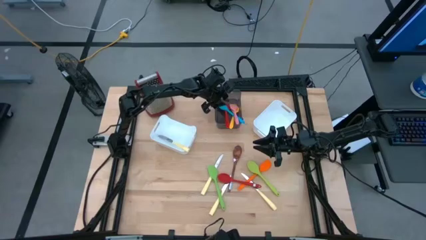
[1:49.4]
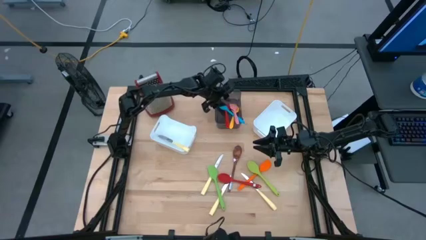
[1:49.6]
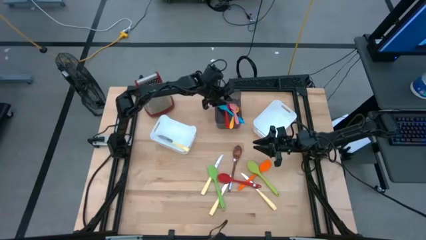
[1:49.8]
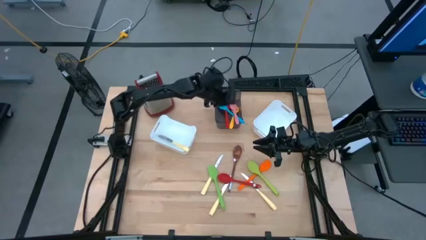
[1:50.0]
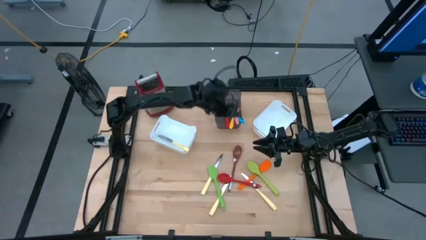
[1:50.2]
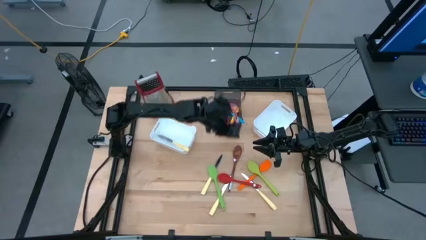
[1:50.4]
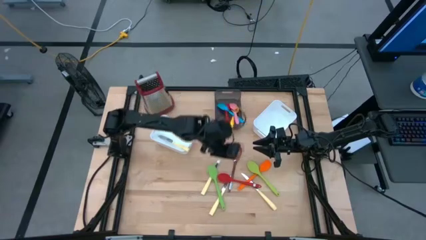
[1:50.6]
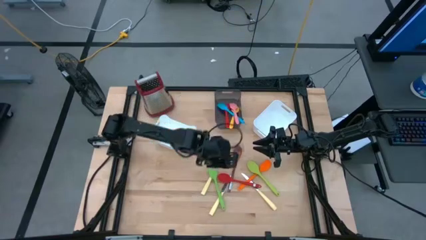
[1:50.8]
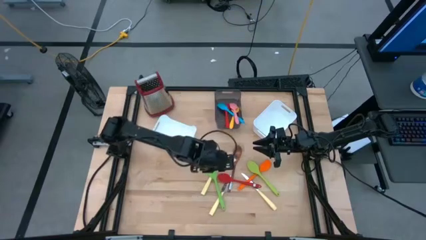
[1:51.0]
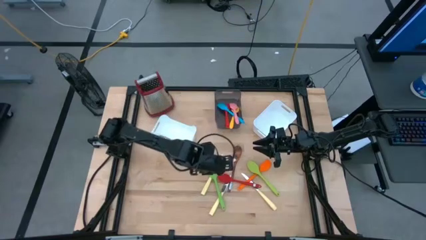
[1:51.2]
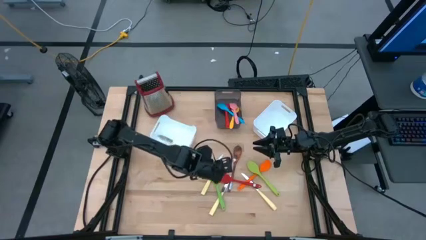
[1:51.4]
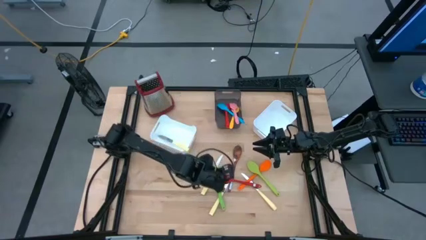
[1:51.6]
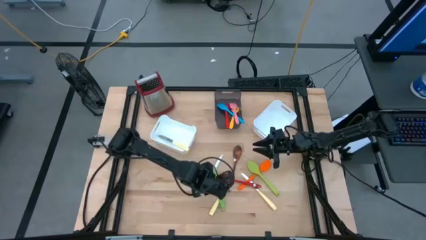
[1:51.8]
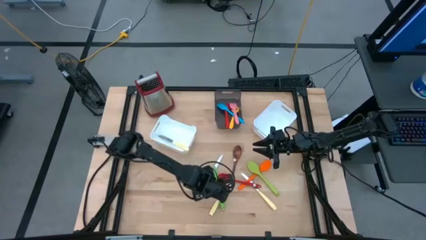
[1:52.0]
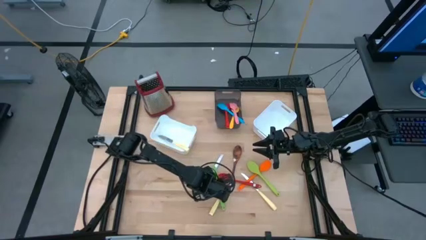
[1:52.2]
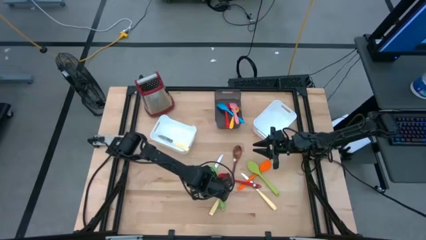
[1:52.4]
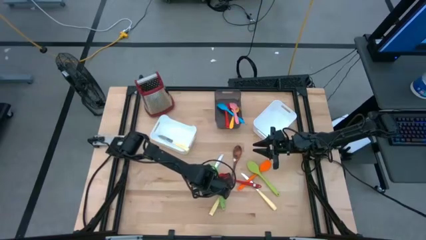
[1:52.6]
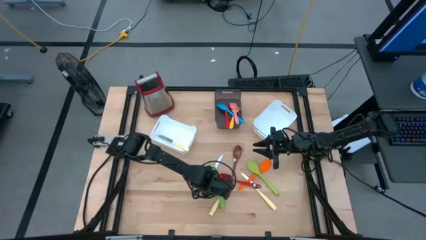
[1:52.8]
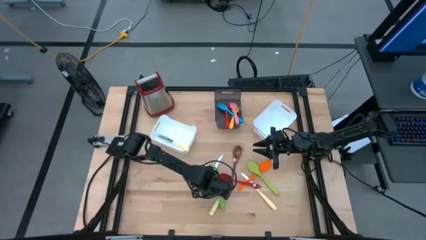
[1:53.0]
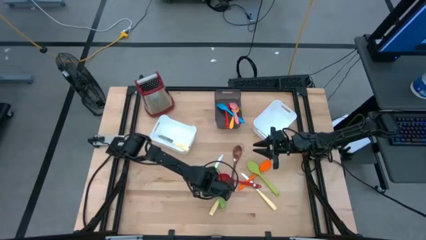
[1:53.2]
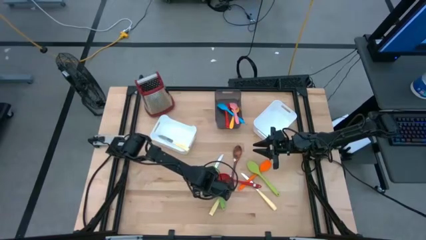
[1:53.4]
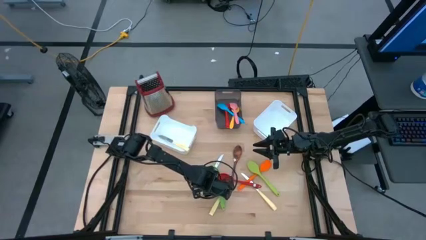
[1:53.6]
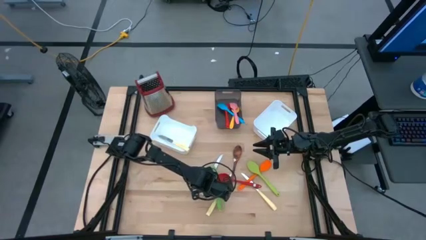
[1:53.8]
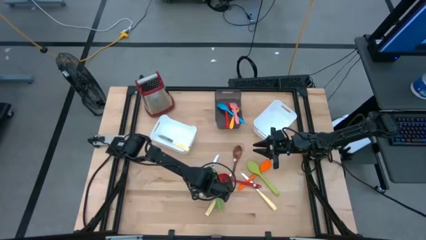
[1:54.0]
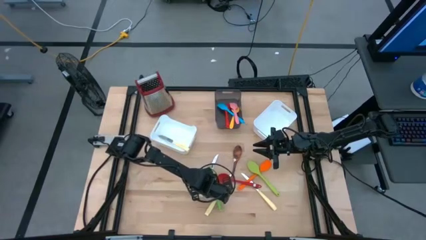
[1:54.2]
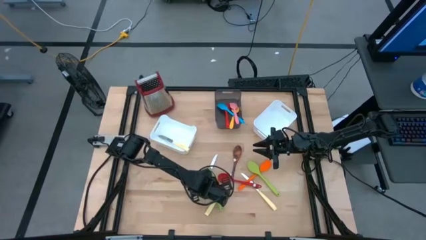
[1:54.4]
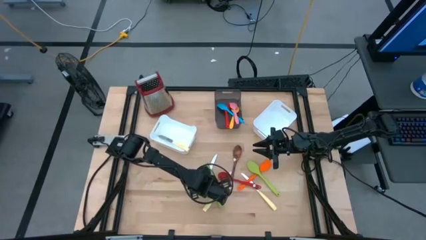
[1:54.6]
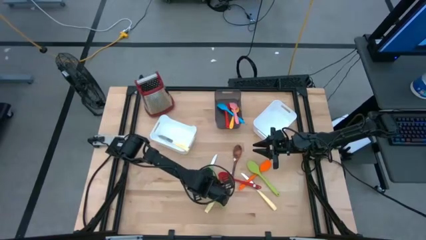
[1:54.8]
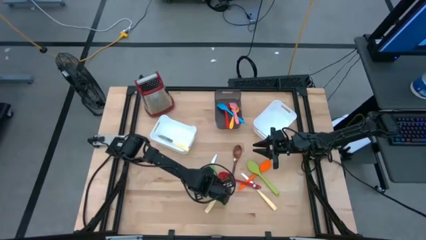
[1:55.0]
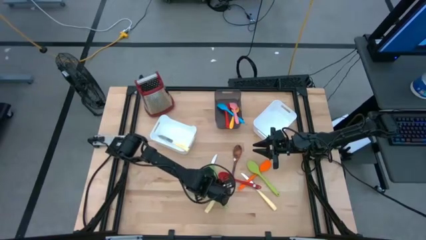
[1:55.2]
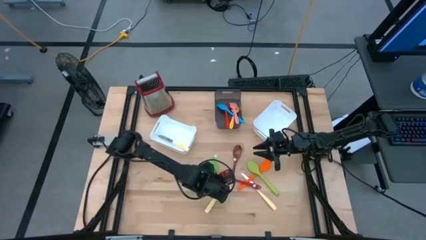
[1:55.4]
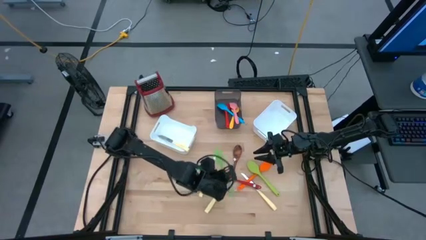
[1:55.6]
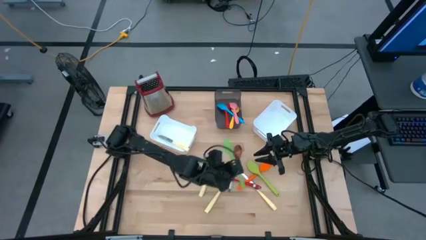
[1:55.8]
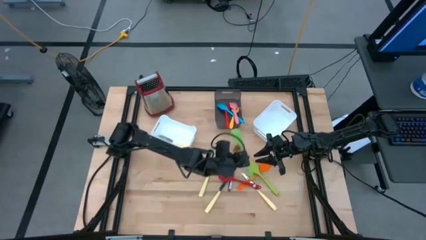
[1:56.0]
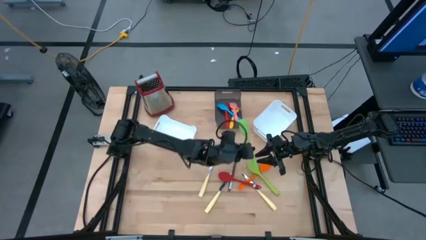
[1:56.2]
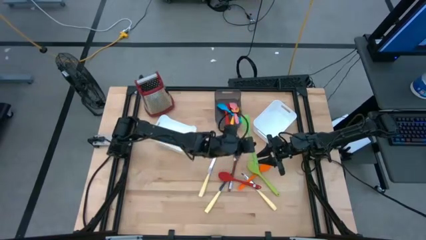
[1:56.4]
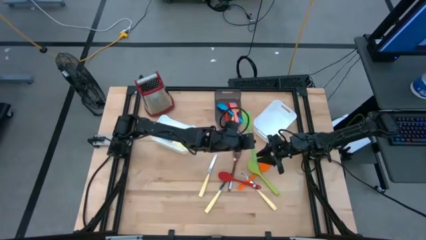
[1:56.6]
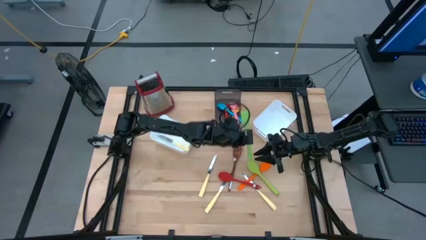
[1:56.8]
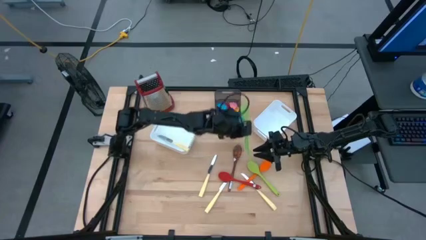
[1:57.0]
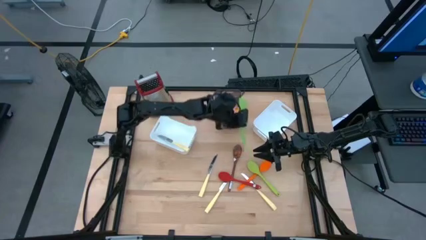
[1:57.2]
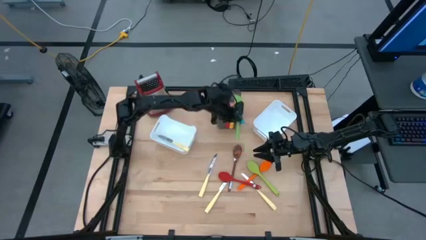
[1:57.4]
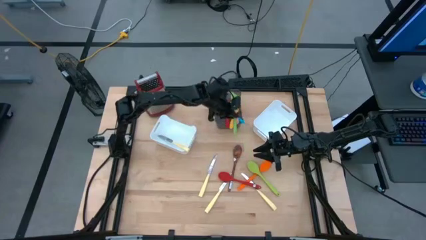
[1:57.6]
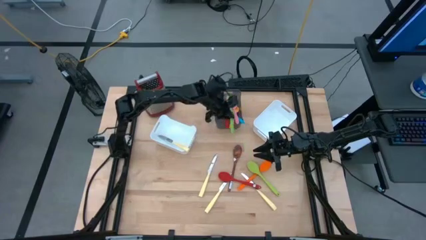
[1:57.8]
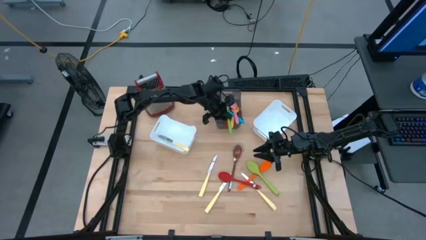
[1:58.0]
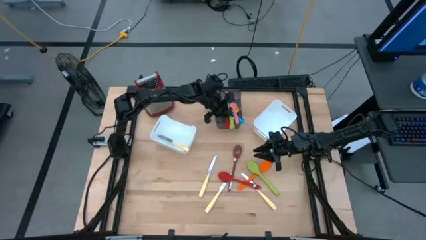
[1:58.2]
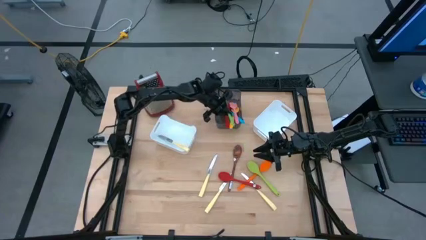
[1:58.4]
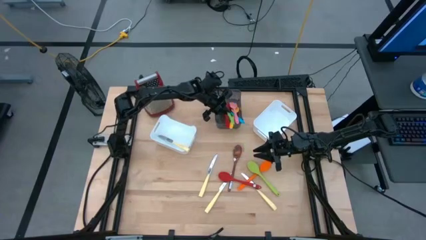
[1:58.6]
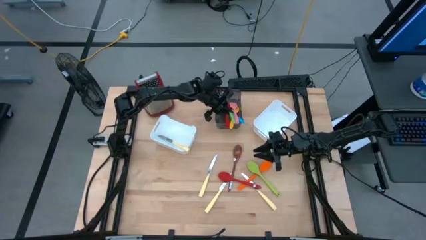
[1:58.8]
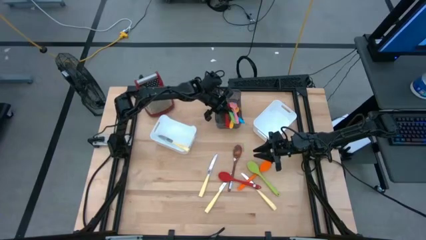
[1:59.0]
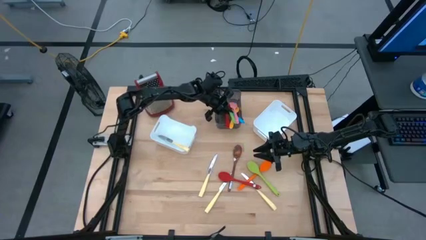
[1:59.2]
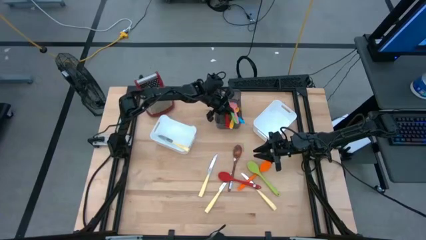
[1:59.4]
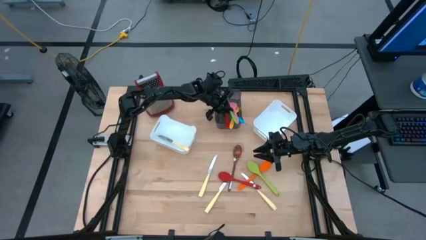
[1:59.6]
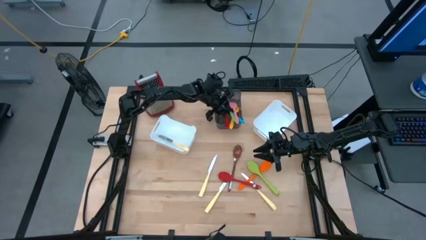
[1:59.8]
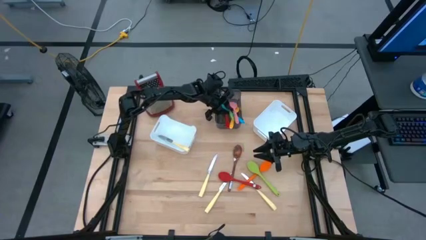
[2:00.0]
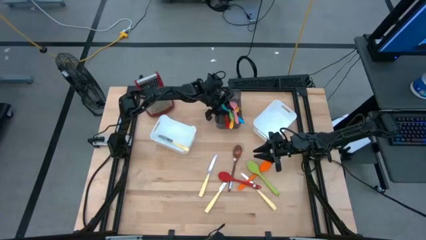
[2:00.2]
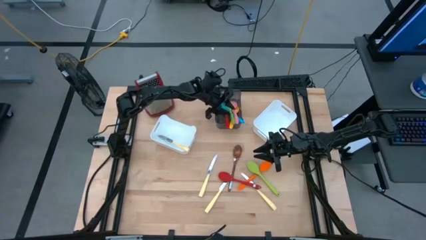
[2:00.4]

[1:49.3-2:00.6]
Task: Pick & Place Kitchen Items
Put the green spatula into the black bin
